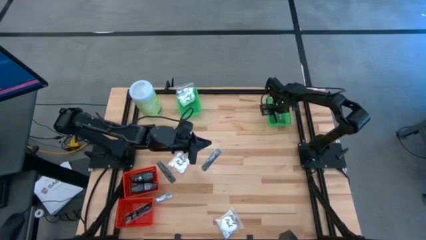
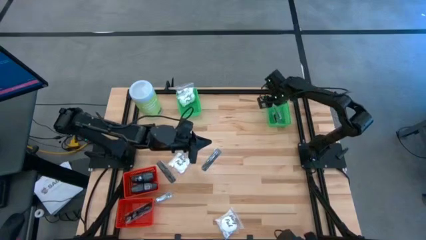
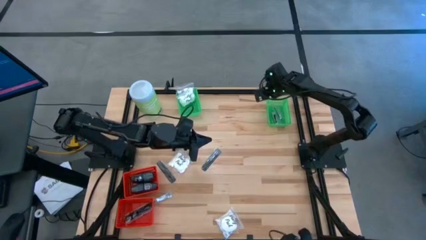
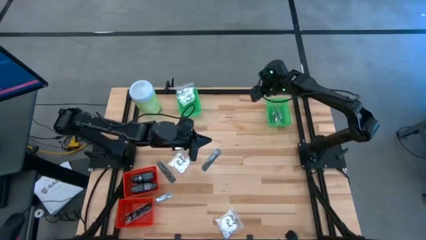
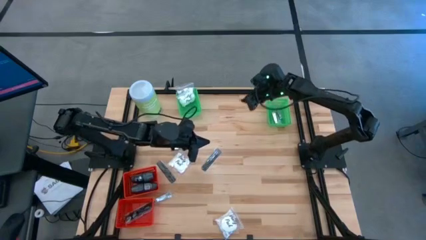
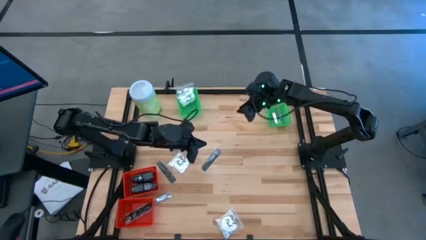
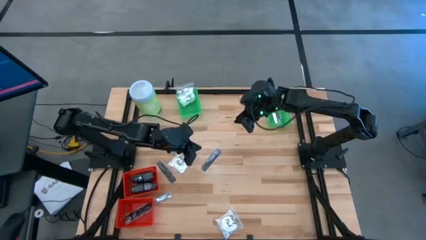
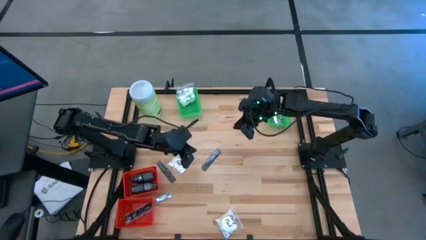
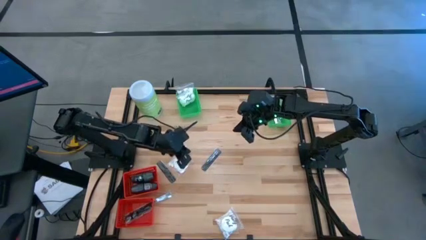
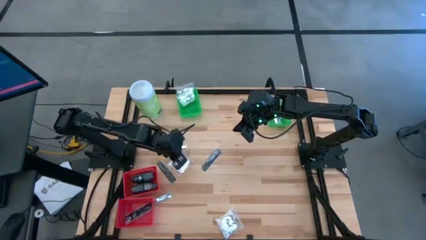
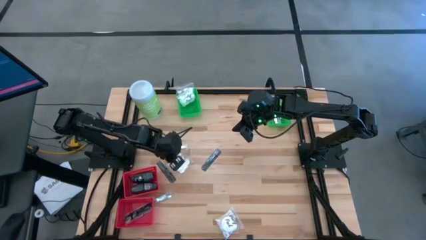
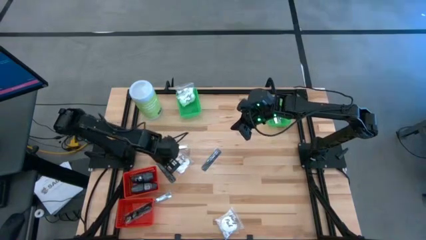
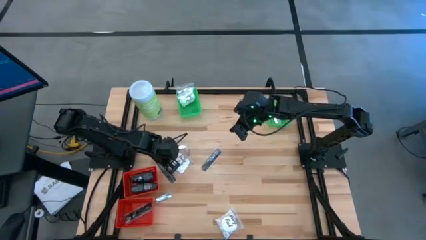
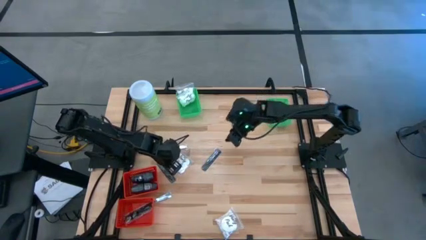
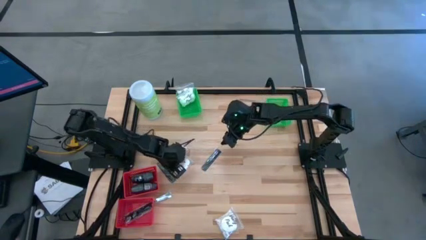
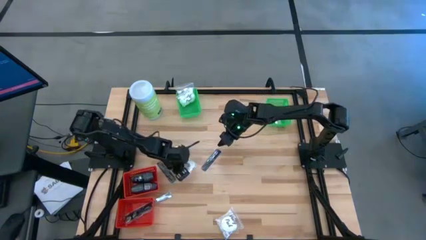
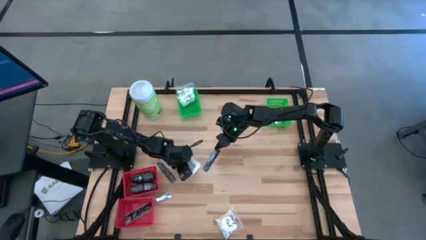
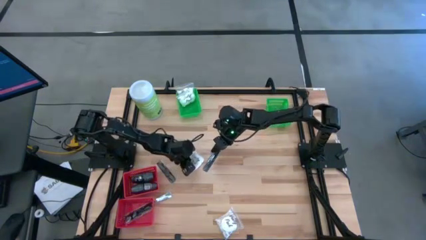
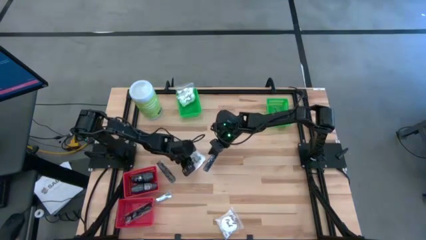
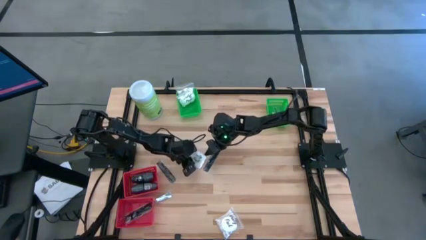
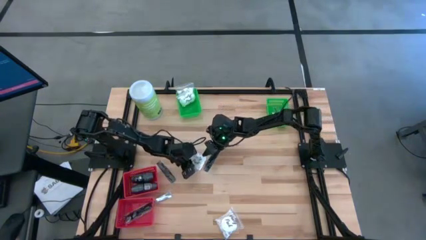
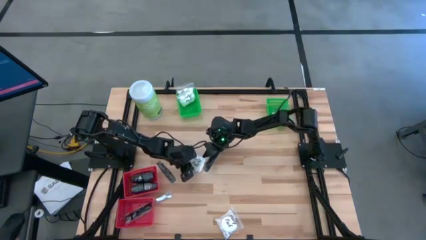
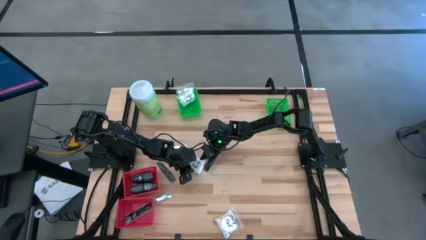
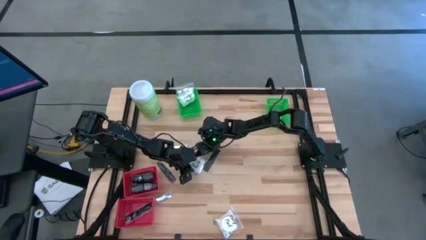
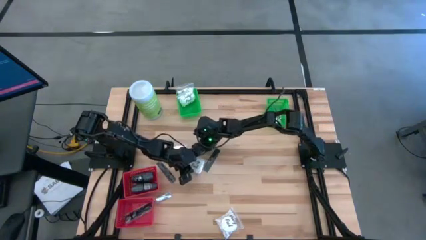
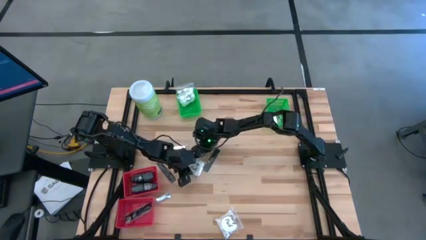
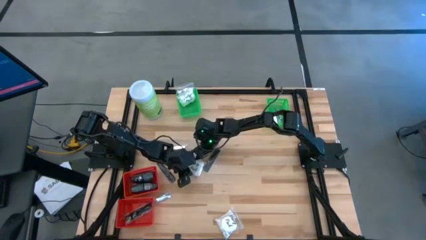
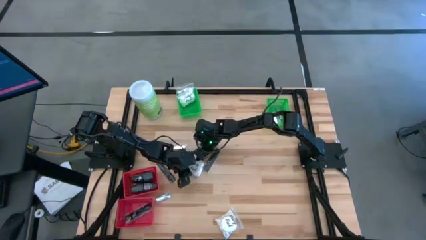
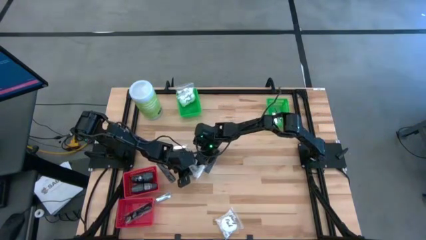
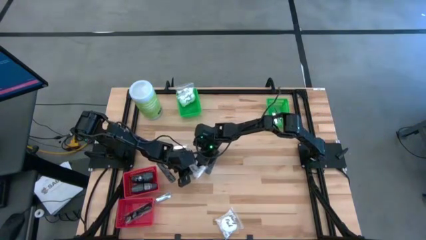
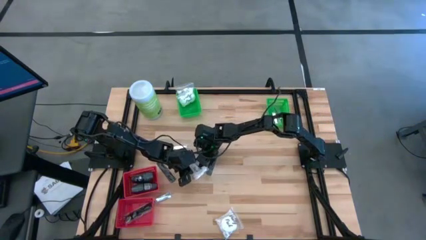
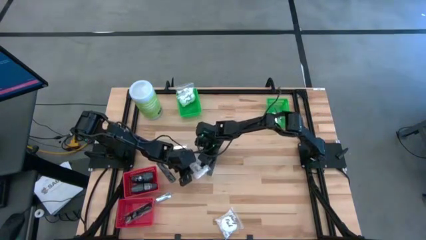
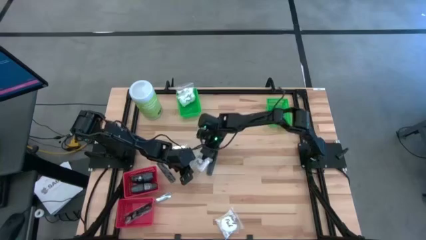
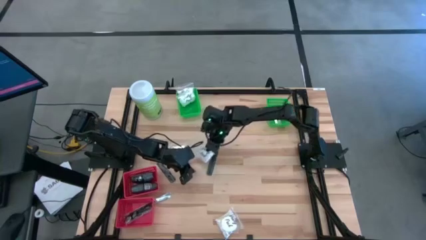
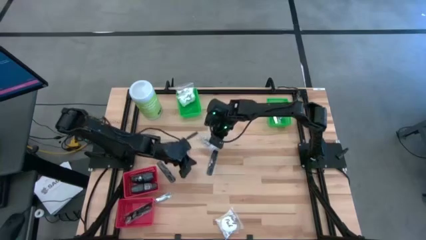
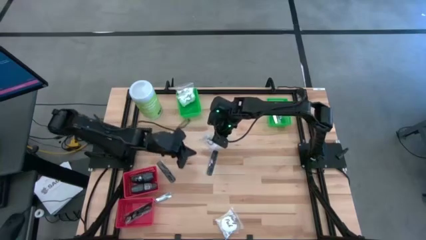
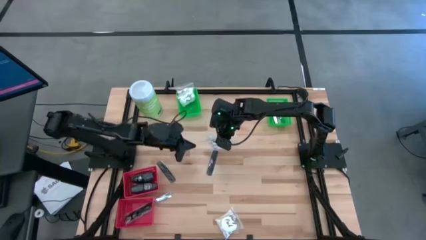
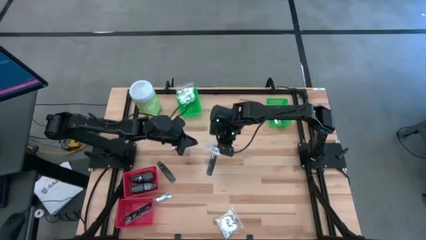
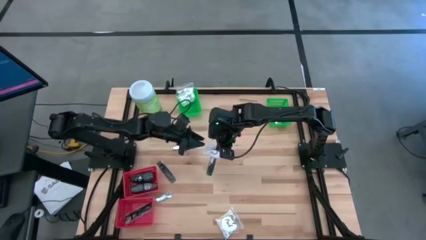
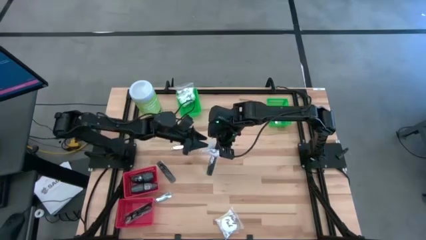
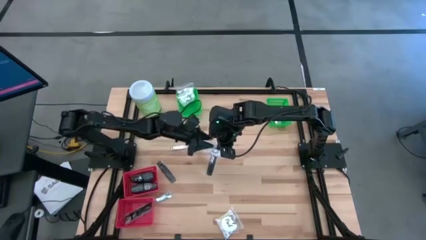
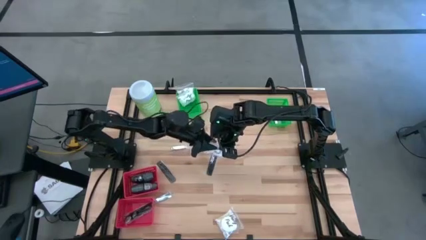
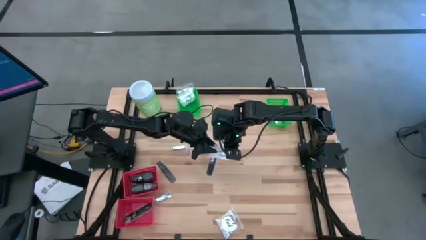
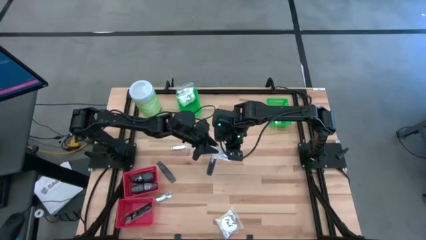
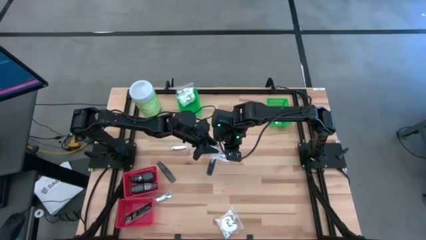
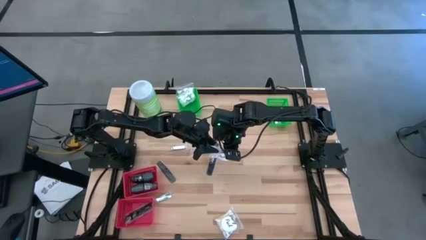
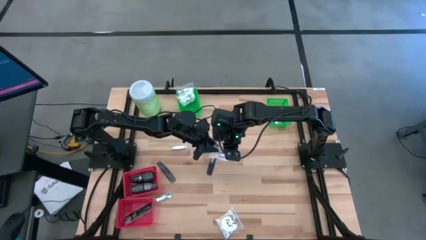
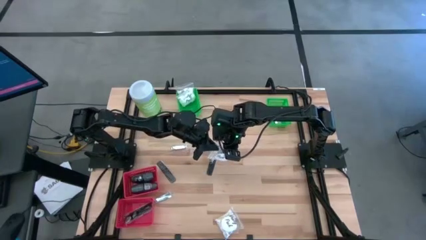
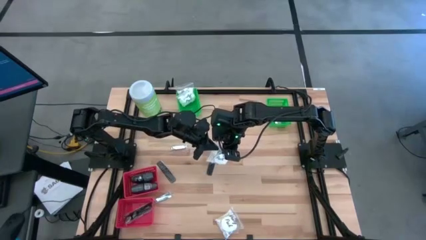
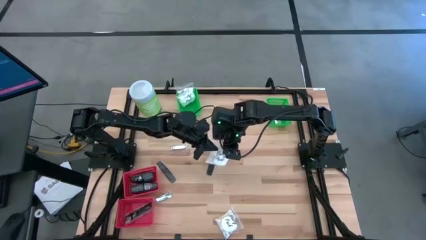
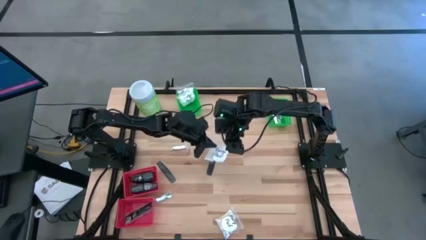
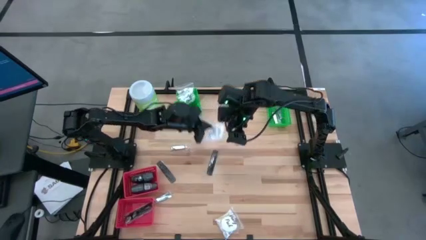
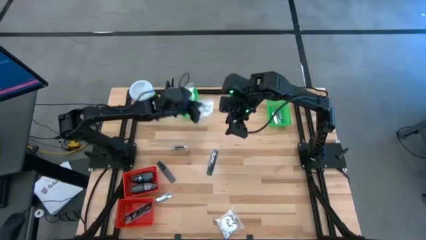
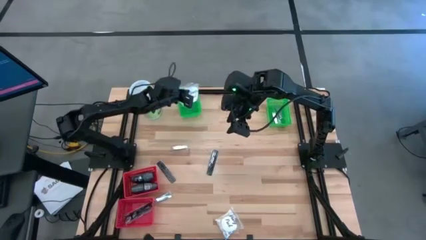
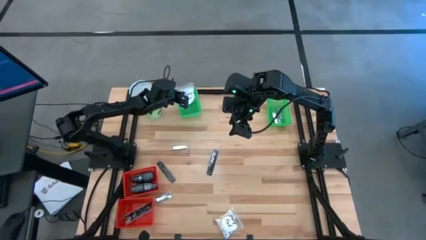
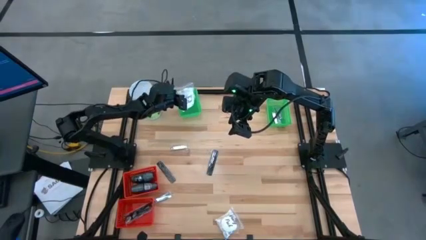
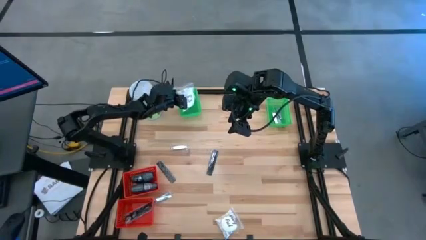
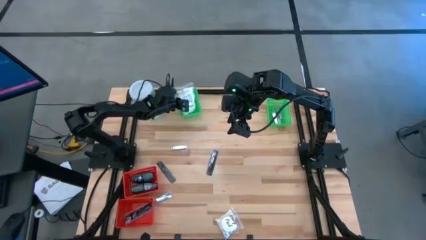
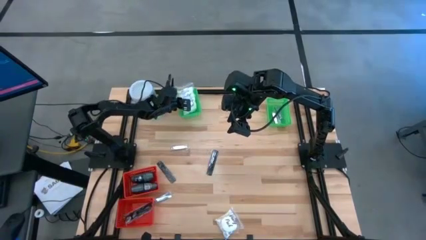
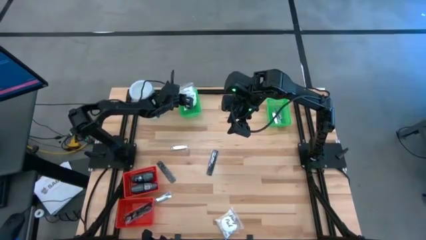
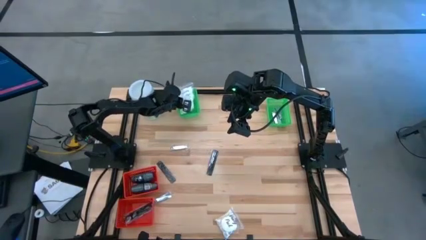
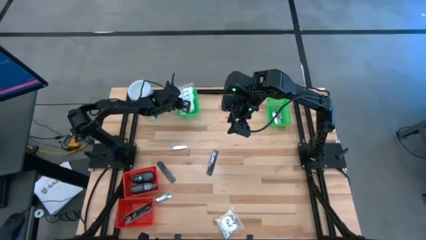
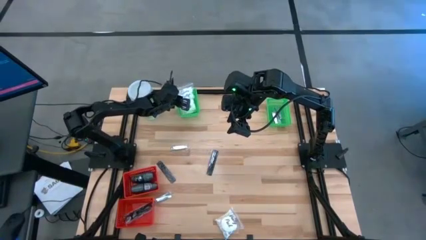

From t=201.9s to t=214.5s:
Task: Pick & Place Travel size toiletries
Put the white vanity pack into the top left green basket

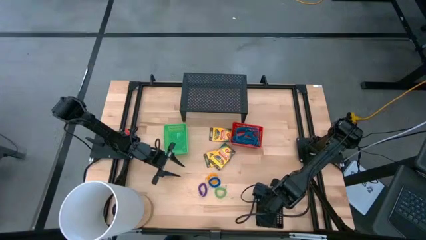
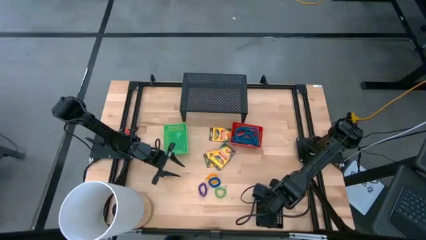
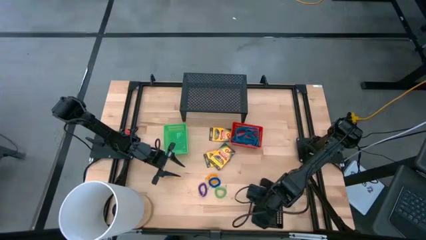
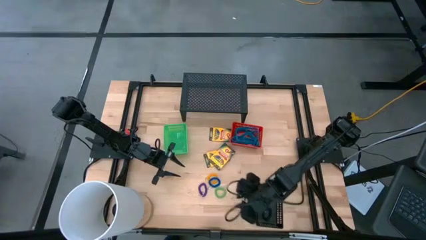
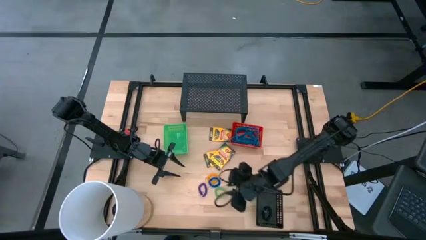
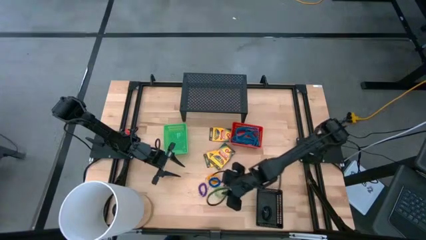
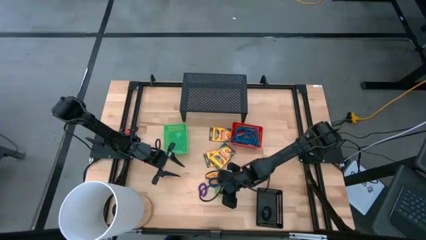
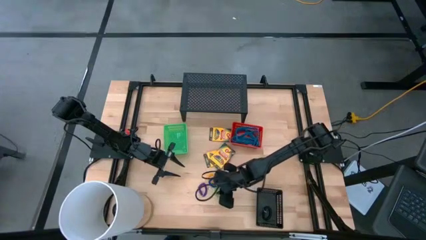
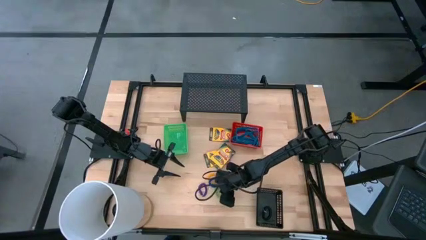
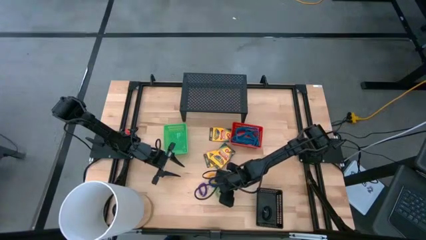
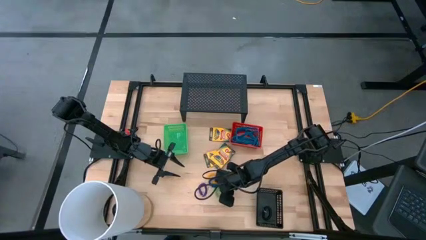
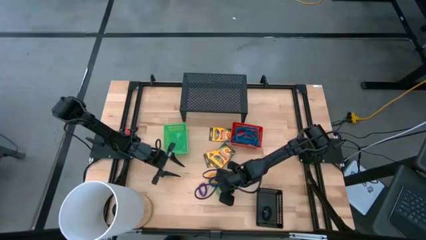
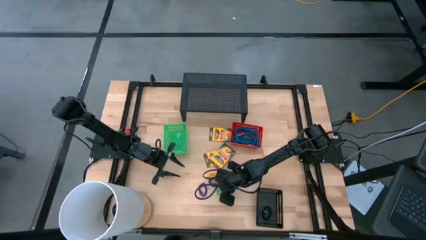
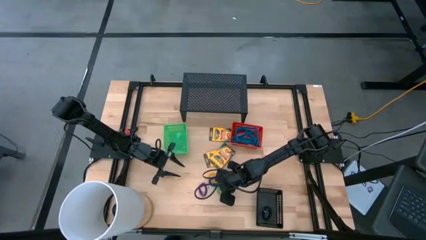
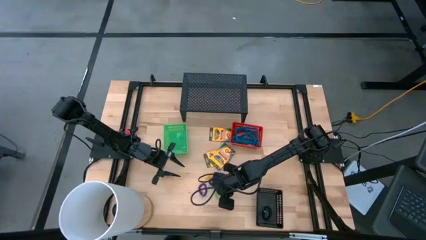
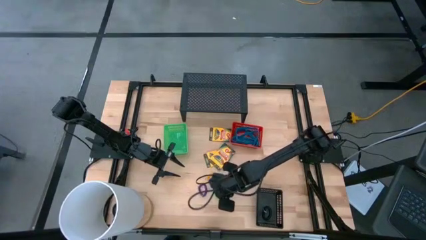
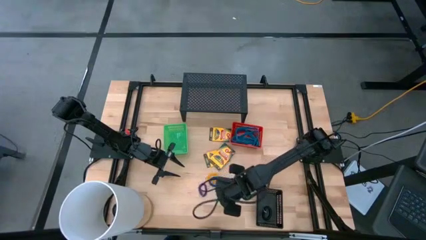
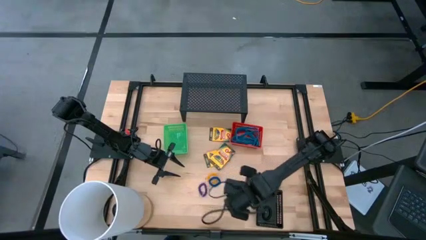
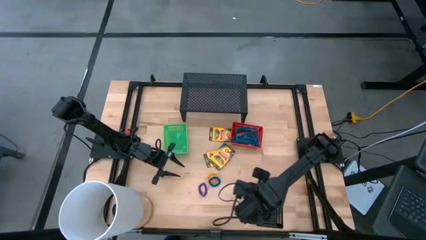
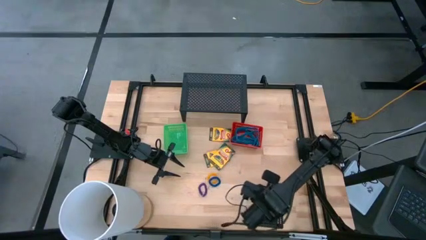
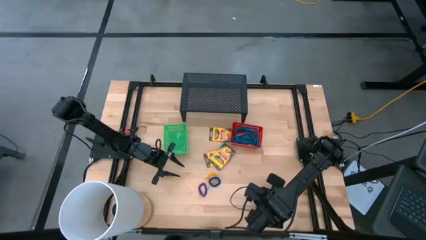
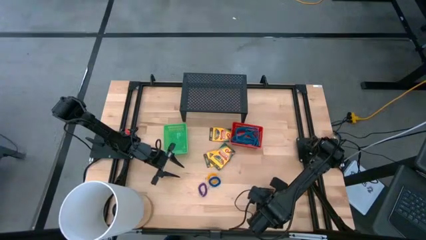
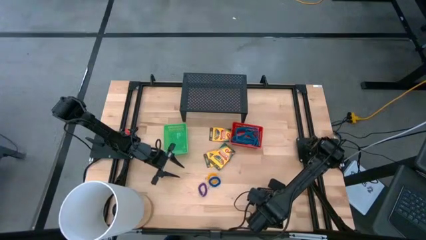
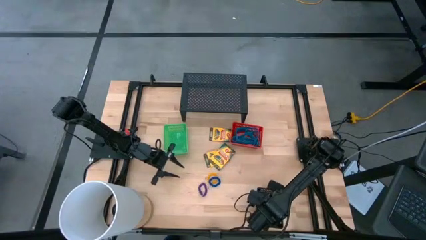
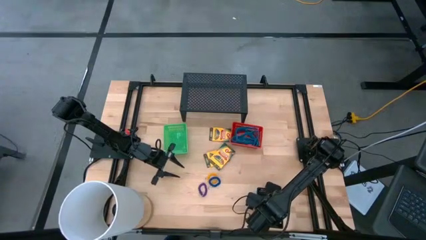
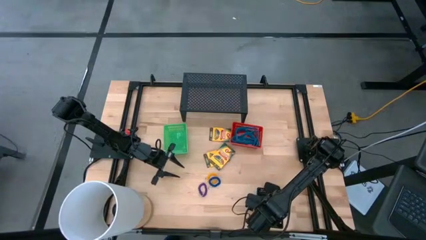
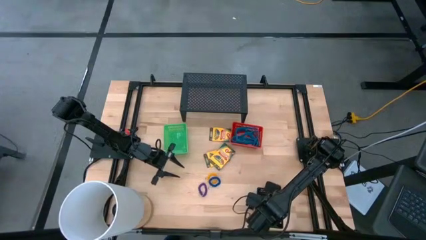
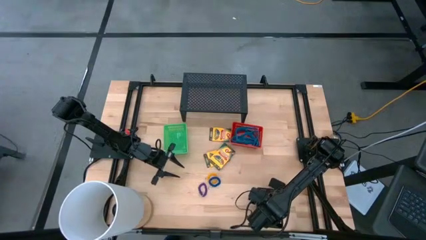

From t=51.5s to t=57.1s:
Task: Pick & Place Office Desk Supplies
Put the green spring keychain into the black bin
